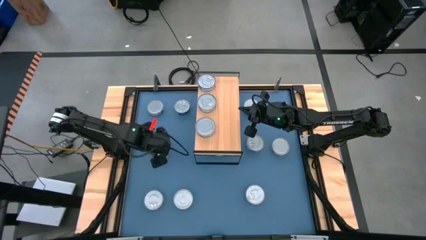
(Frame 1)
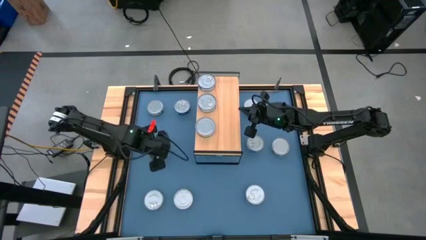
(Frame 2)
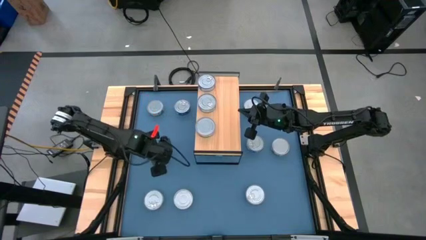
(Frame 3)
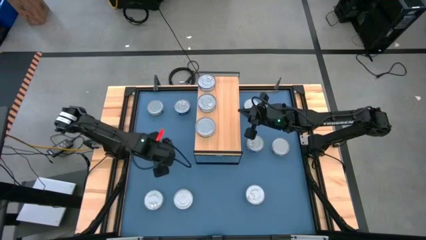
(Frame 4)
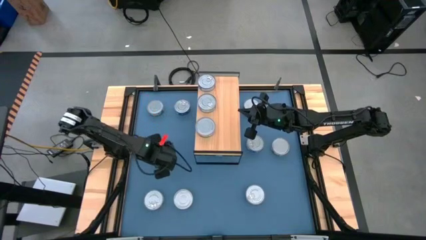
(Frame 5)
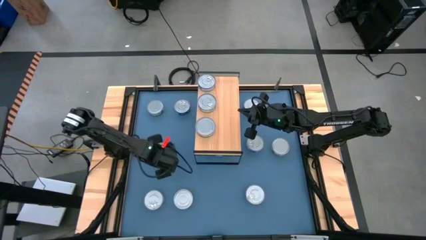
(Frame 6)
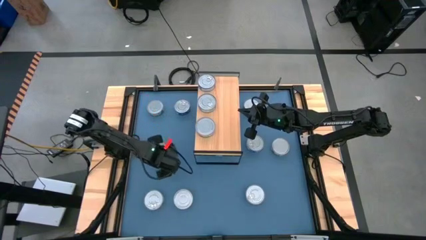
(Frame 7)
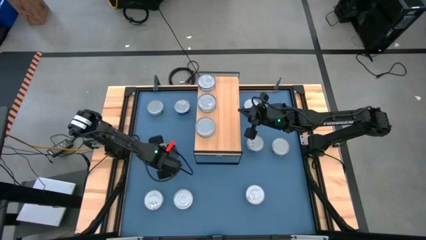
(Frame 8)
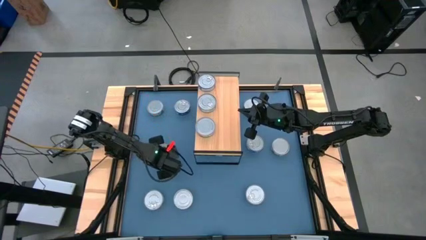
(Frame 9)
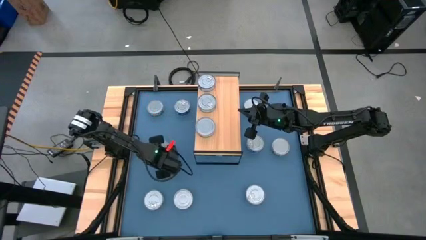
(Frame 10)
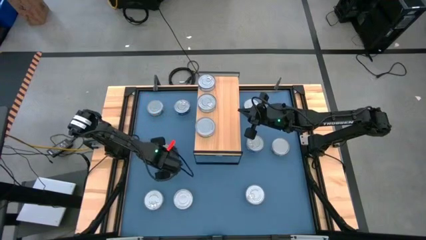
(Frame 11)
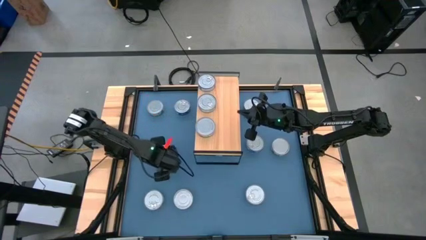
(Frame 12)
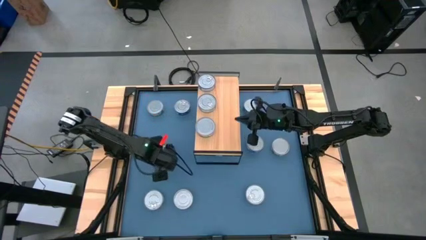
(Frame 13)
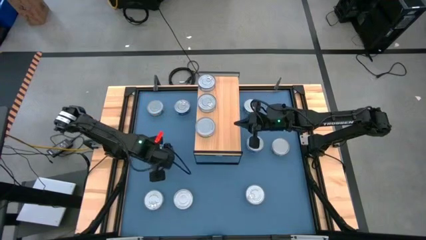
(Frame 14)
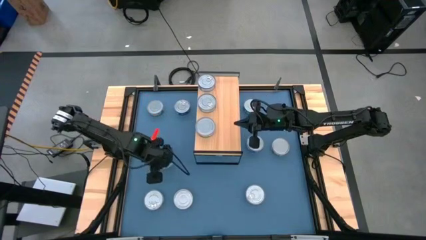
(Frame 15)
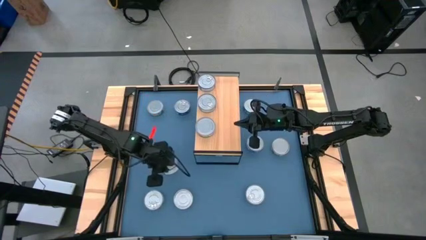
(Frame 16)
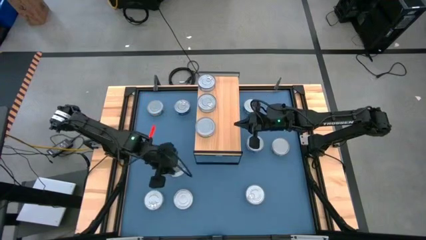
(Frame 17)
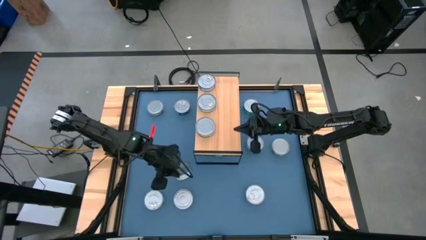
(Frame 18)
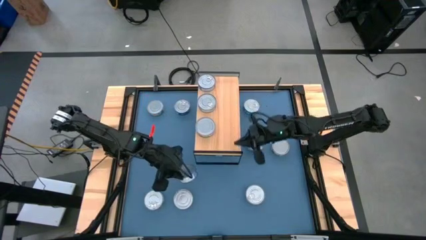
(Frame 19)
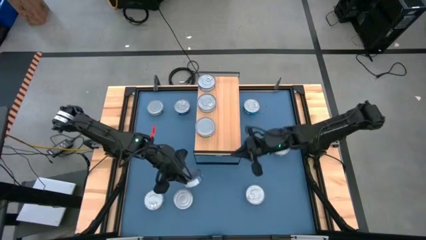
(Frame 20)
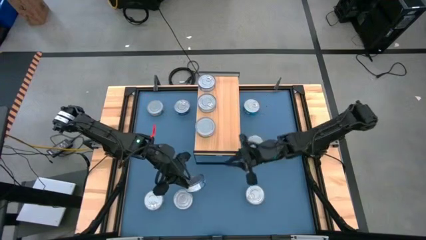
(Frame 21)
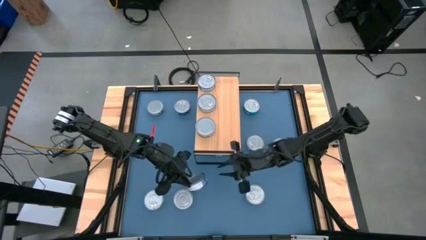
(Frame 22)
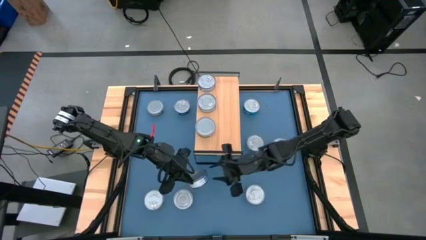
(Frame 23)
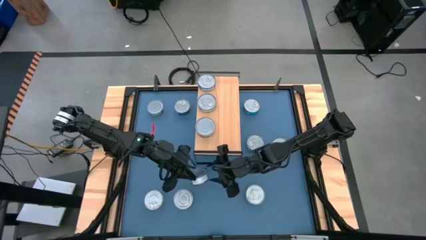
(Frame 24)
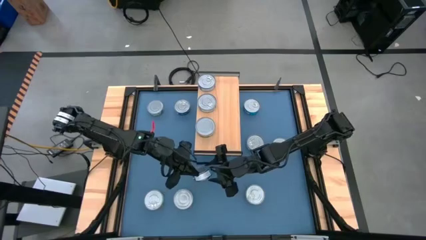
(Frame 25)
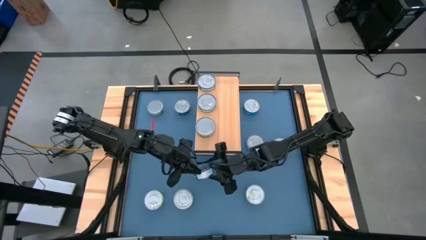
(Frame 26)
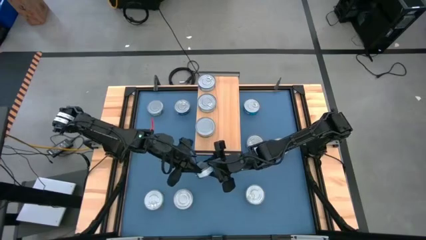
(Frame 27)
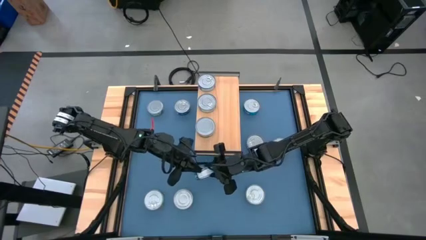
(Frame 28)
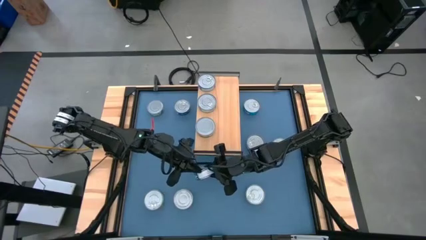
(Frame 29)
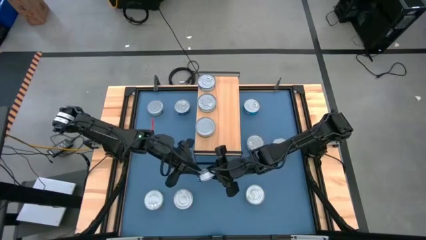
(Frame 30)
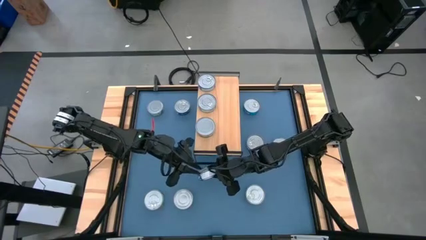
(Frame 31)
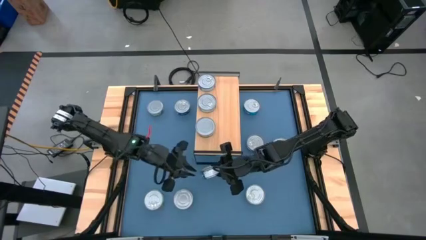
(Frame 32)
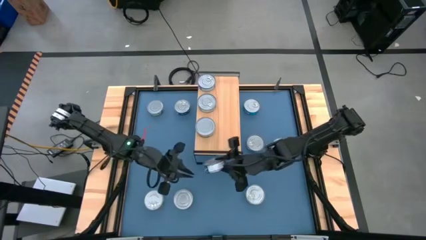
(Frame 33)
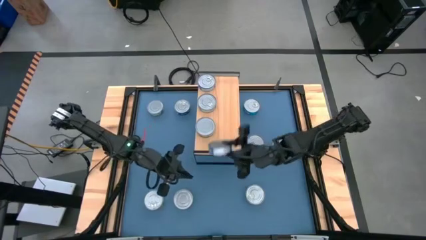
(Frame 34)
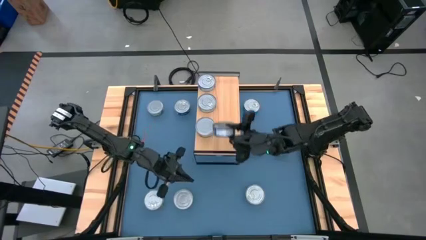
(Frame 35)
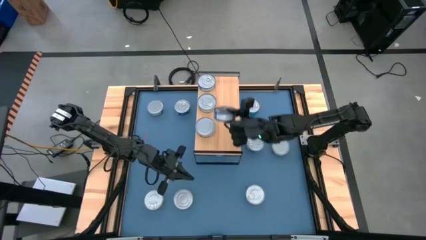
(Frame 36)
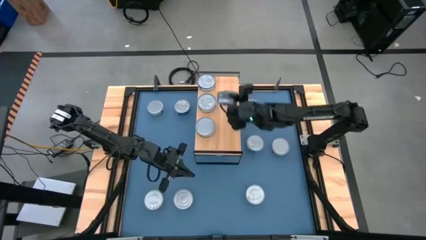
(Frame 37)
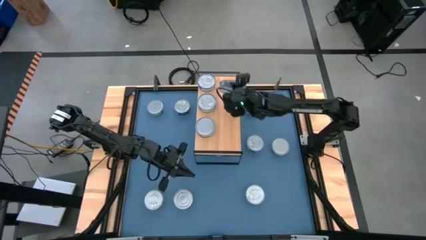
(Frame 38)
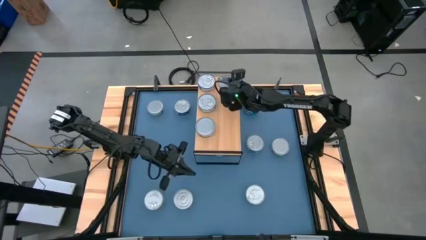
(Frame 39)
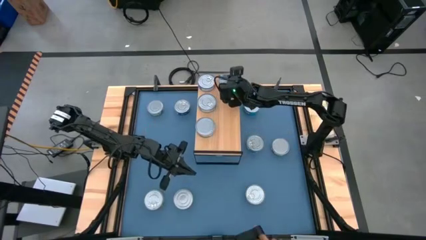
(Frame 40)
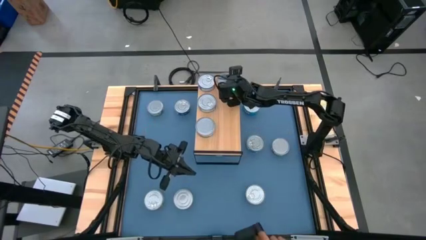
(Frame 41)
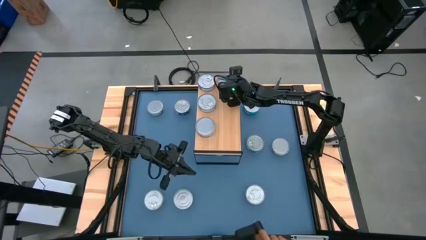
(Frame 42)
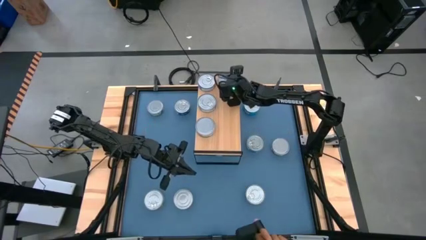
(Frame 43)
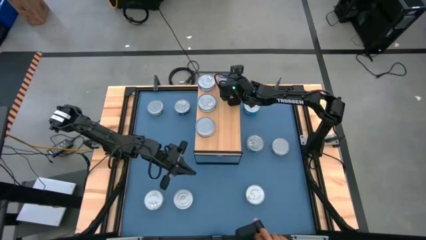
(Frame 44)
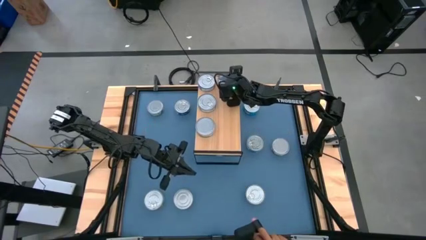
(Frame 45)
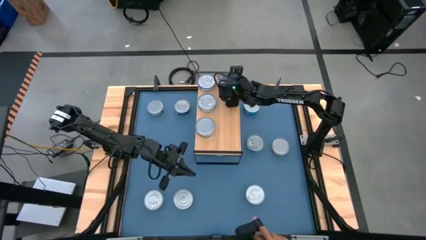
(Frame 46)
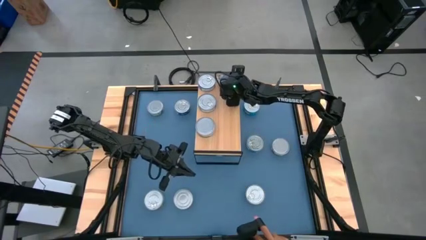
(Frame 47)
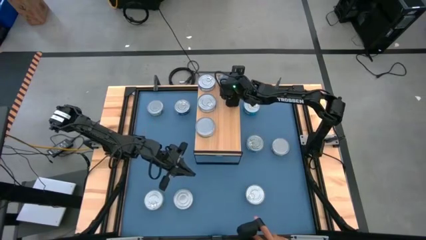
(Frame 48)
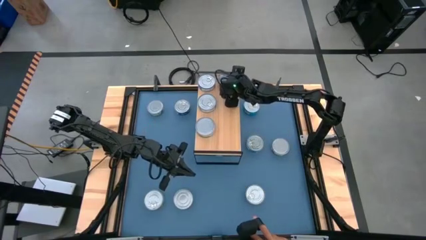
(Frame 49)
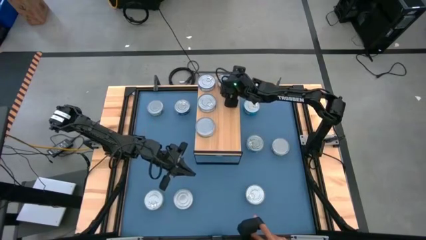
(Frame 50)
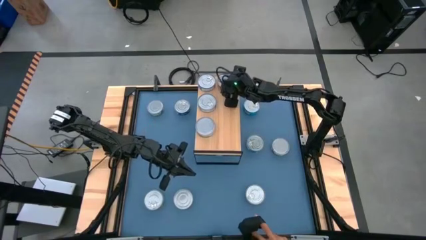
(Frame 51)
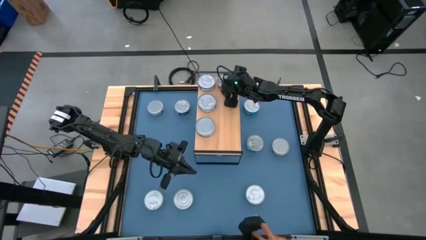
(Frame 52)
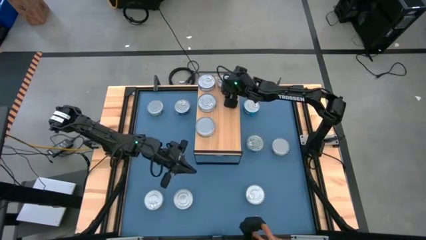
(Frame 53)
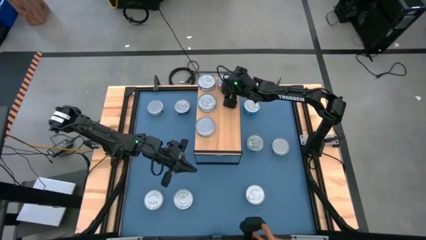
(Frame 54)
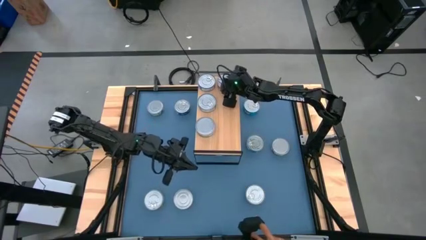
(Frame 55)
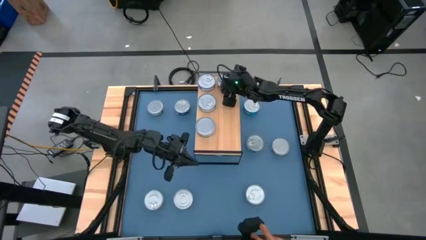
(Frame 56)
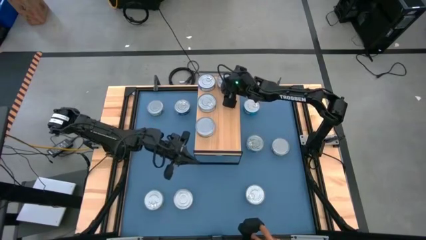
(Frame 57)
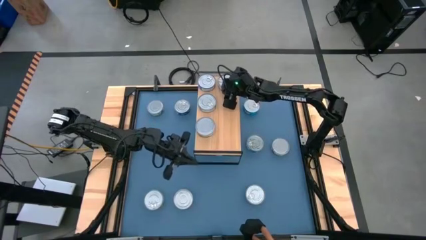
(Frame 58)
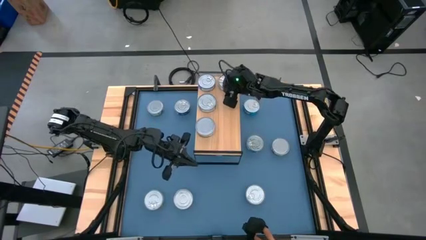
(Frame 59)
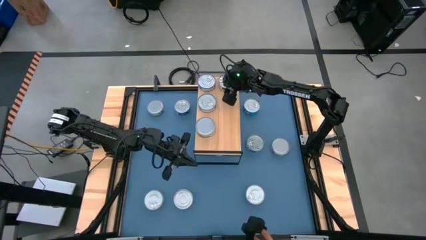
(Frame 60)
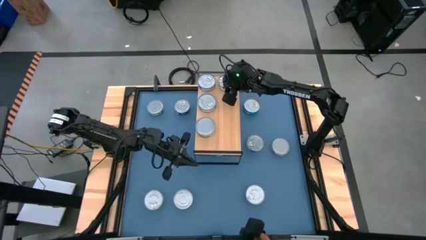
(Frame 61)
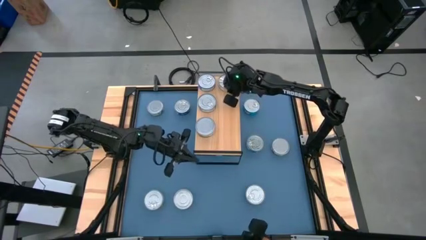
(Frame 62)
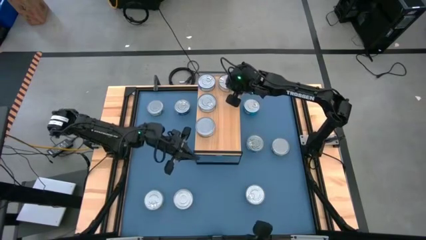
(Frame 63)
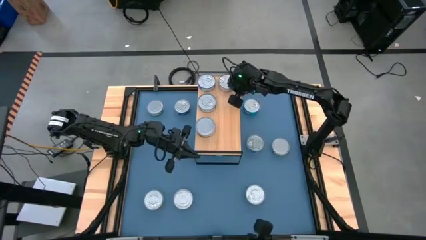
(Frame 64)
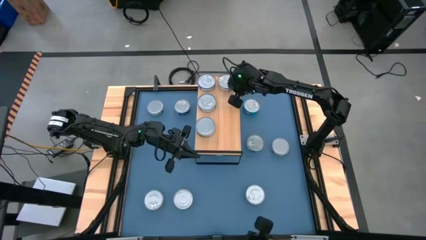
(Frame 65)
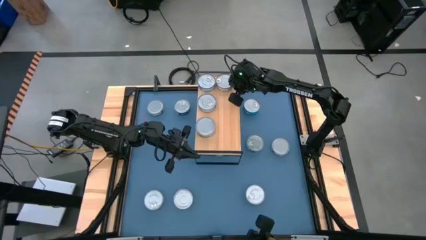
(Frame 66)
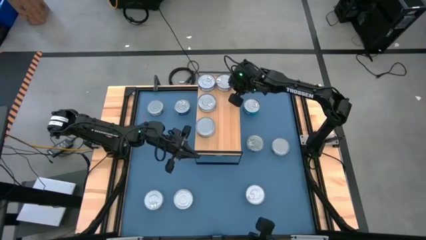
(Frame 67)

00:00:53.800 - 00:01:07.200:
Task: Stack canned seafood by type on shelf
Put the blue tuna can on the shelf

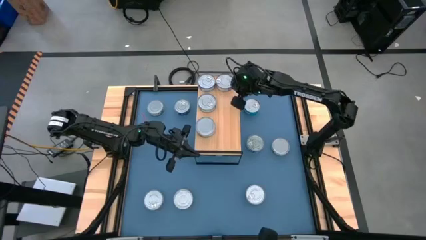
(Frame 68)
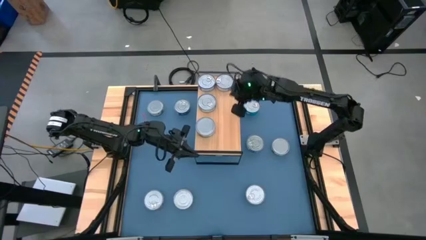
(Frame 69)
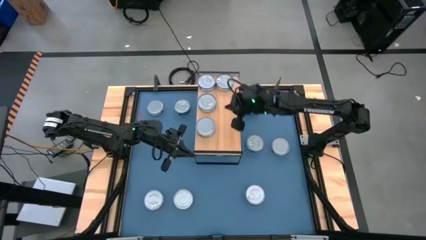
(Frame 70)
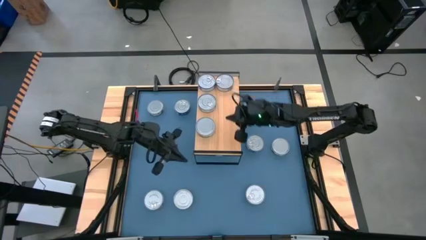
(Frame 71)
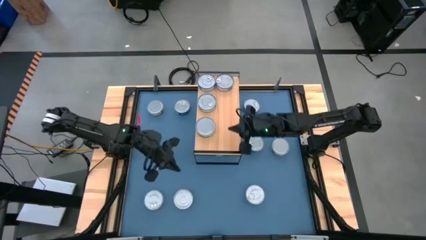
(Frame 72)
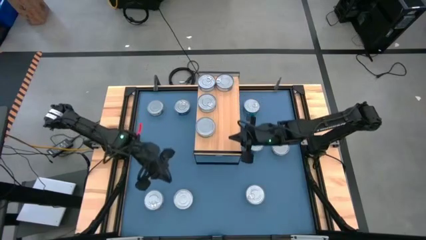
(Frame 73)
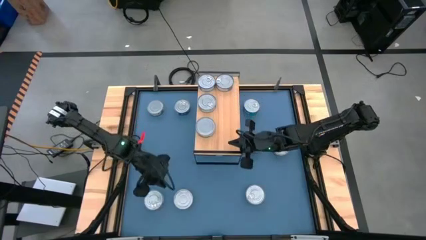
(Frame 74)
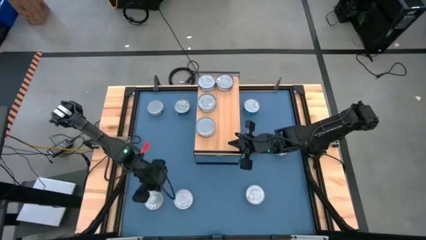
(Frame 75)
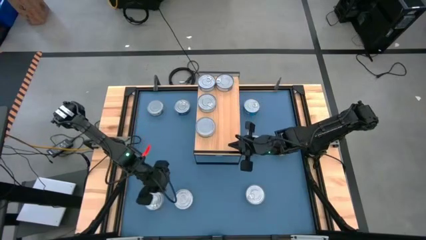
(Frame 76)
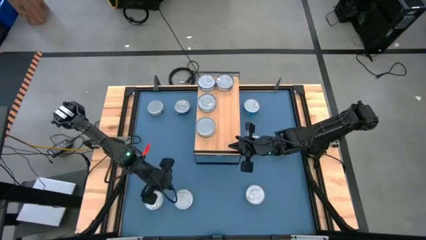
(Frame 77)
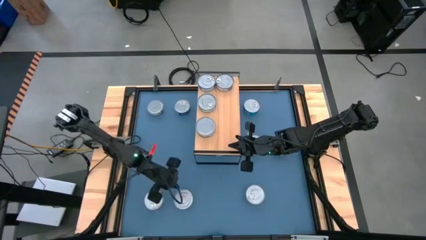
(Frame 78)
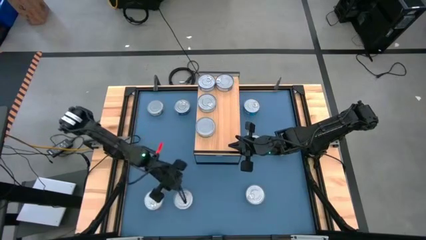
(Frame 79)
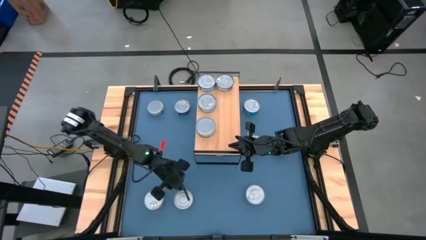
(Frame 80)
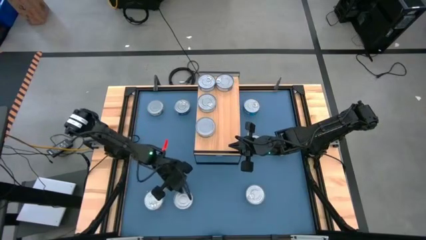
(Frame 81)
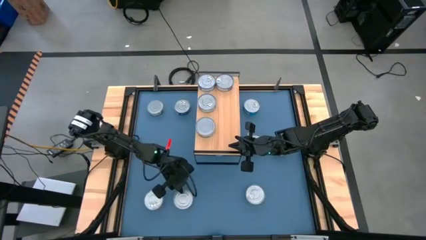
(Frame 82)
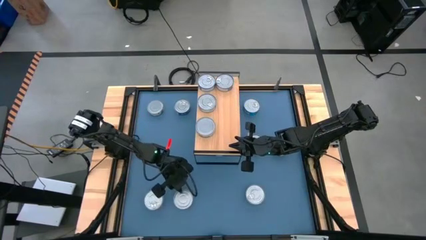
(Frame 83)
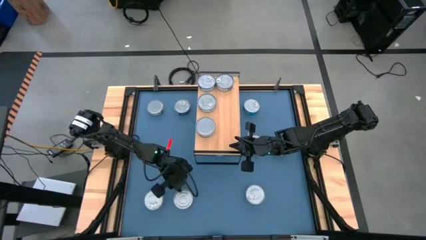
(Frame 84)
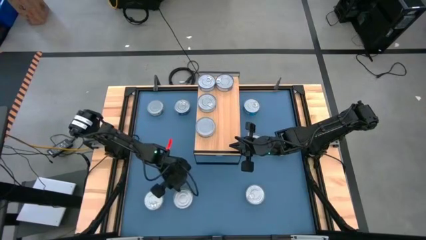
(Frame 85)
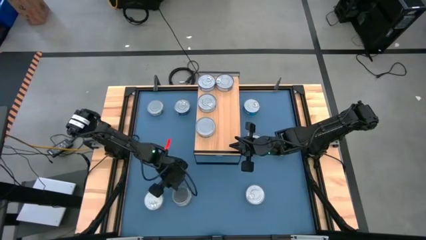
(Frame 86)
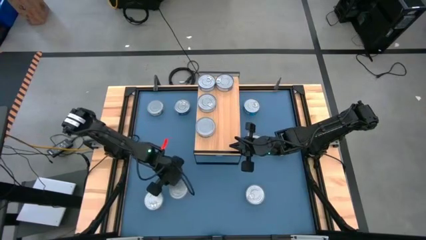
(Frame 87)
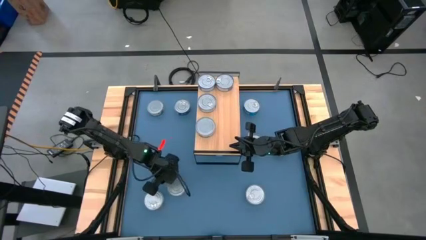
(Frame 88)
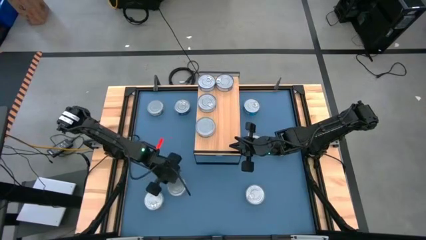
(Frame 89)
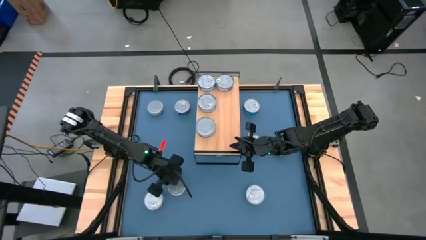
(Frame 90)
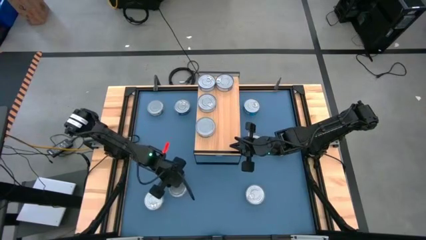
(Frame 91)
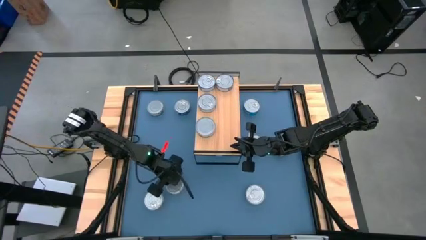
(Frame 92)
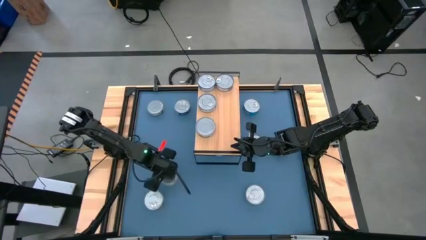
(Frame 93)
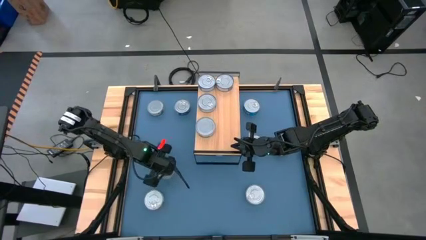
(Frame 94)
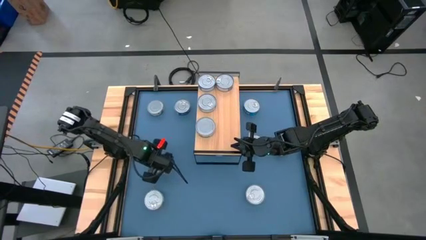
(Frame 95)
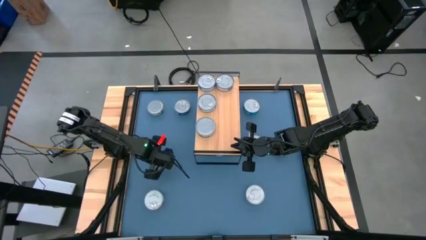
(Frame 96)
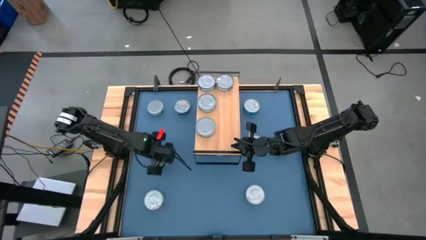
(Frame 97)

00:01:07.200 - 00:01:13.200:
Move the green tuna can to the middle right of the table
